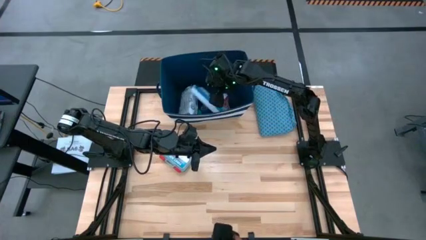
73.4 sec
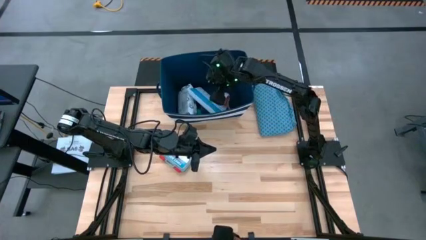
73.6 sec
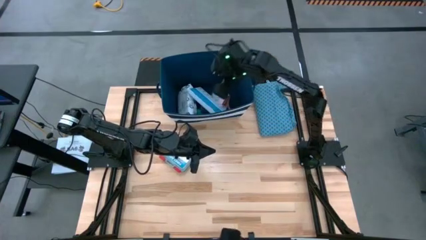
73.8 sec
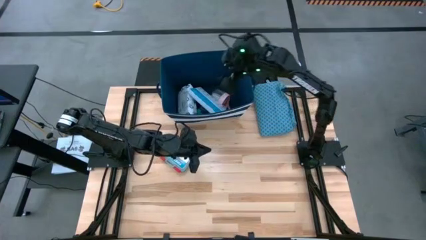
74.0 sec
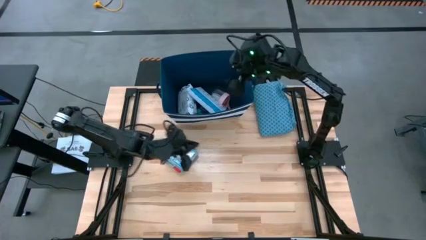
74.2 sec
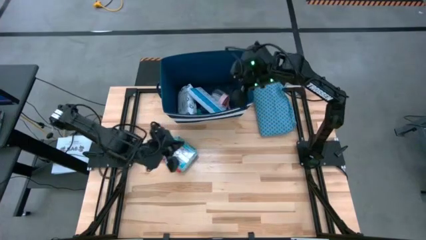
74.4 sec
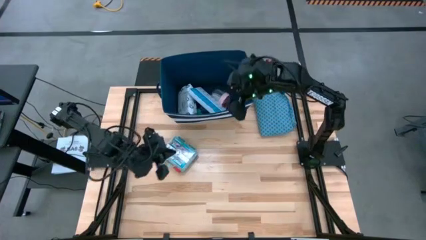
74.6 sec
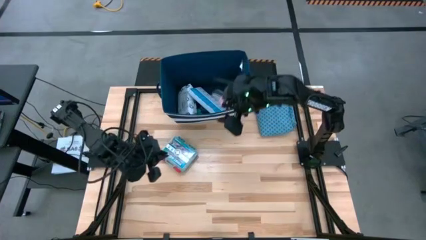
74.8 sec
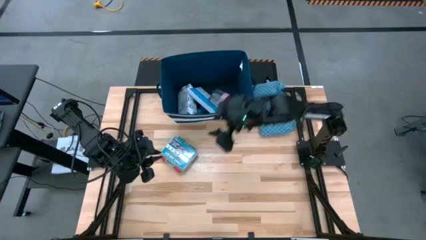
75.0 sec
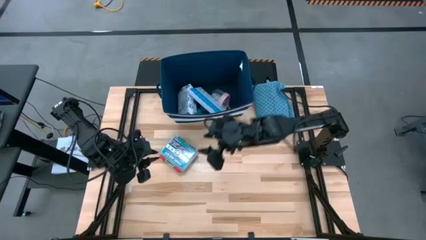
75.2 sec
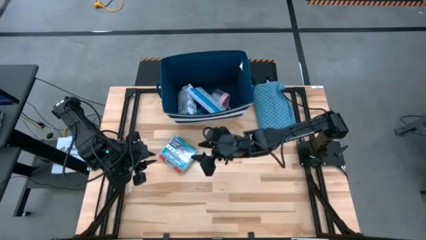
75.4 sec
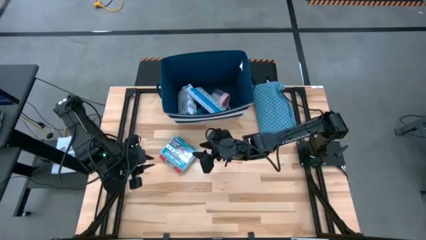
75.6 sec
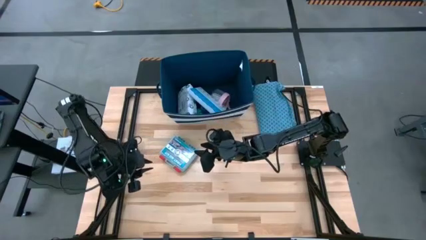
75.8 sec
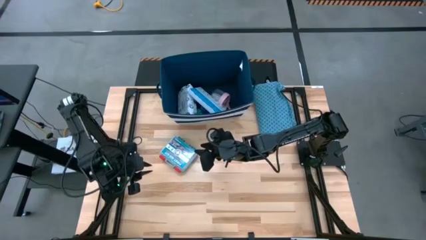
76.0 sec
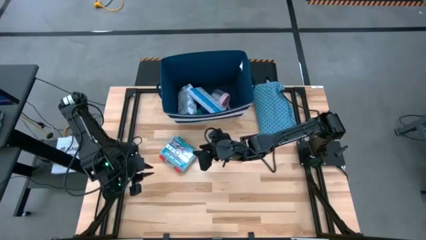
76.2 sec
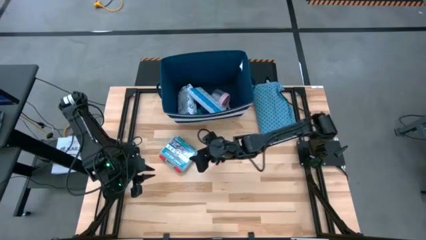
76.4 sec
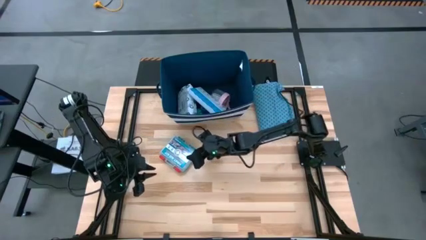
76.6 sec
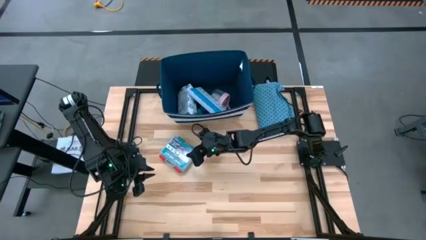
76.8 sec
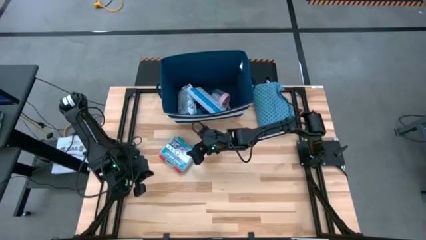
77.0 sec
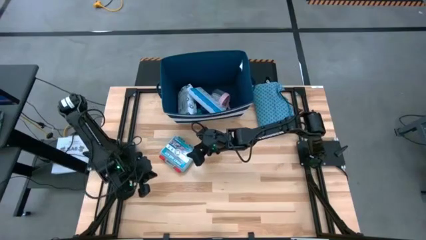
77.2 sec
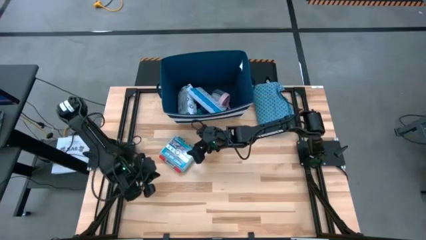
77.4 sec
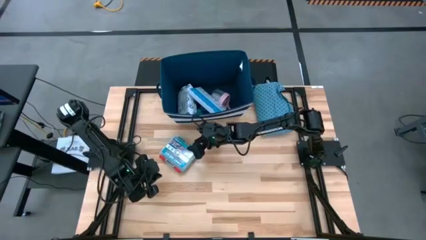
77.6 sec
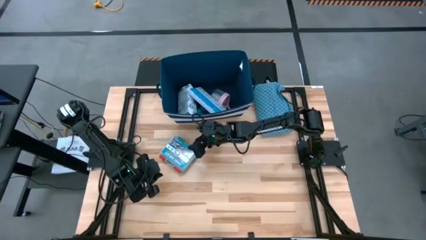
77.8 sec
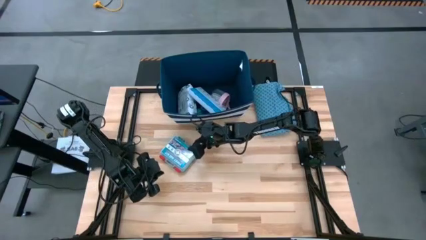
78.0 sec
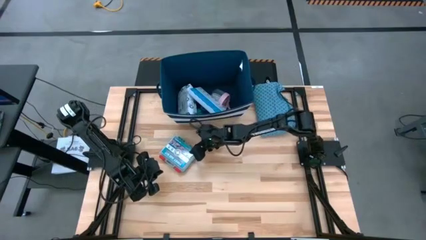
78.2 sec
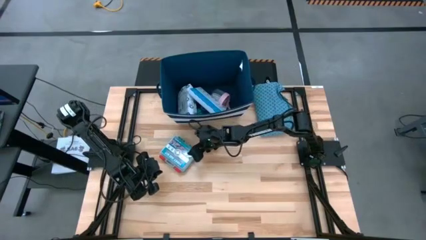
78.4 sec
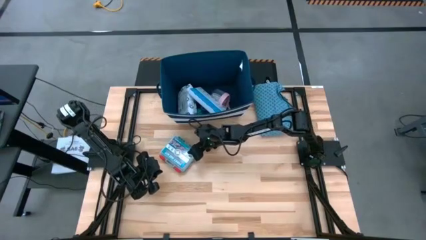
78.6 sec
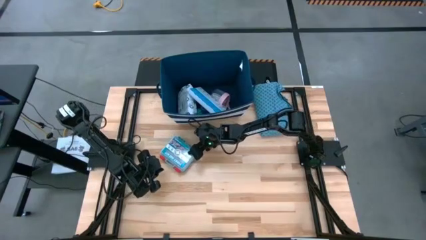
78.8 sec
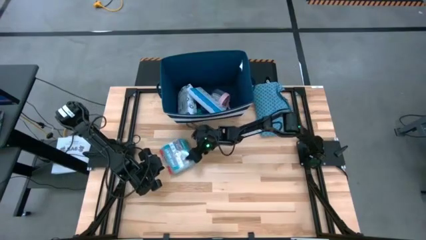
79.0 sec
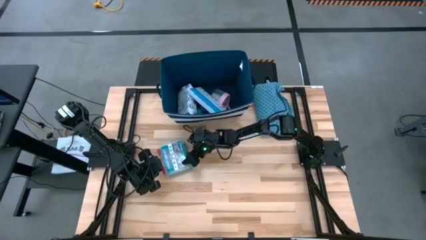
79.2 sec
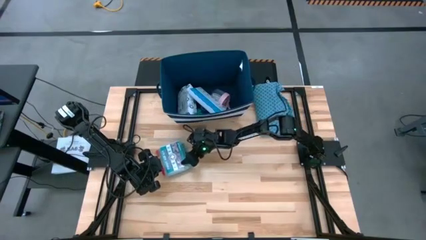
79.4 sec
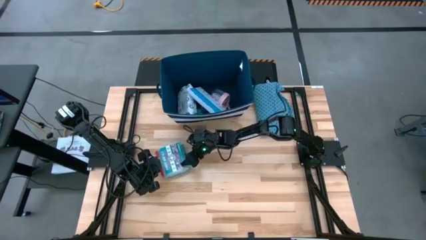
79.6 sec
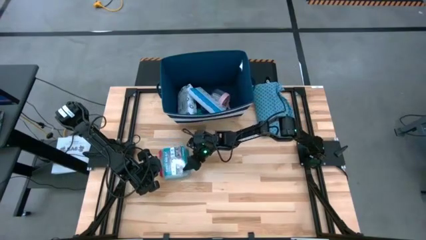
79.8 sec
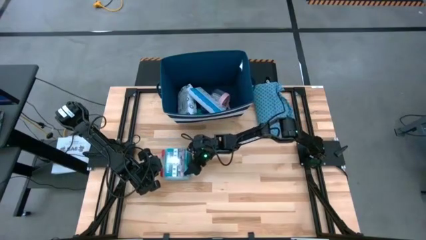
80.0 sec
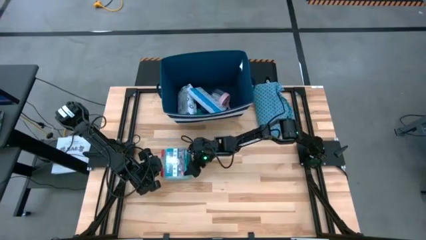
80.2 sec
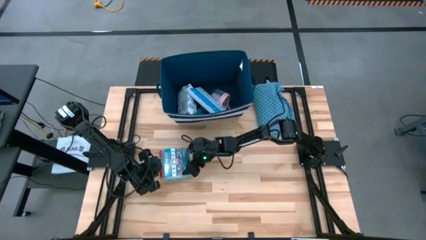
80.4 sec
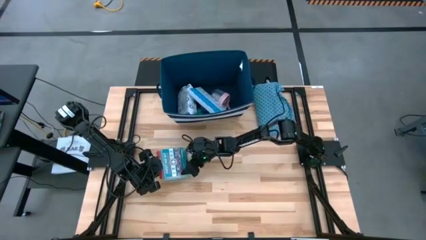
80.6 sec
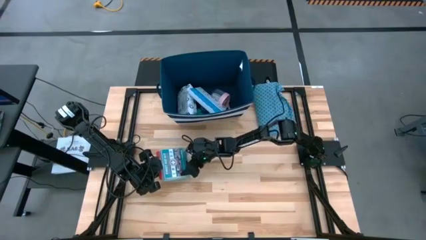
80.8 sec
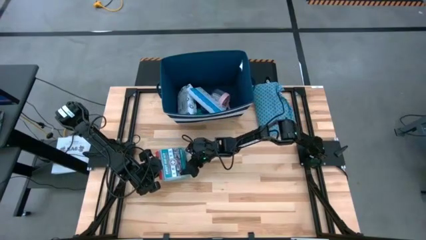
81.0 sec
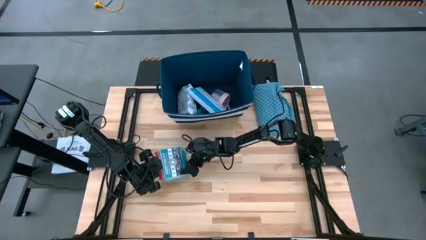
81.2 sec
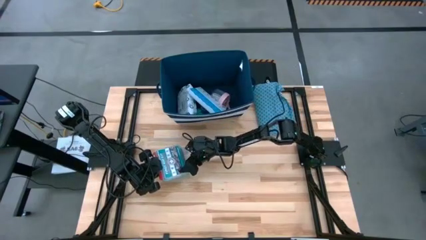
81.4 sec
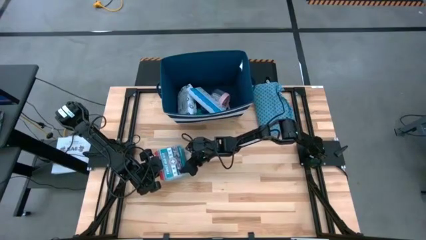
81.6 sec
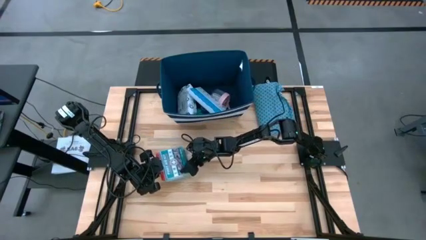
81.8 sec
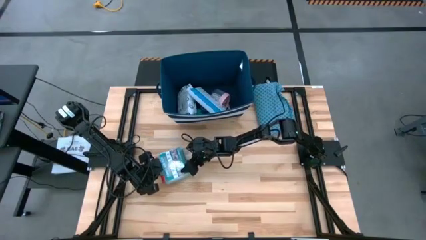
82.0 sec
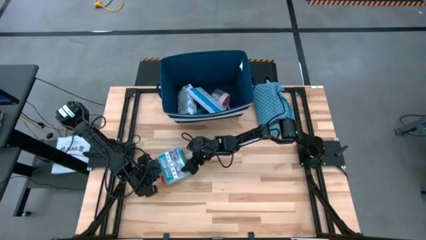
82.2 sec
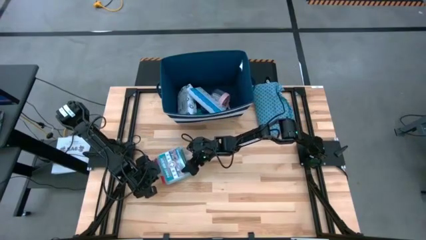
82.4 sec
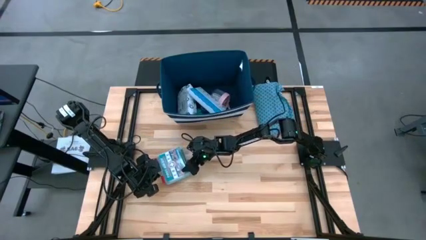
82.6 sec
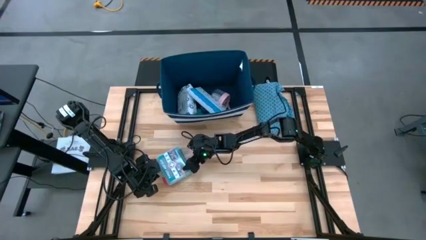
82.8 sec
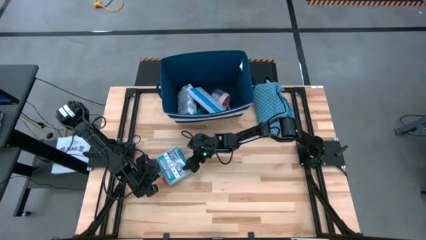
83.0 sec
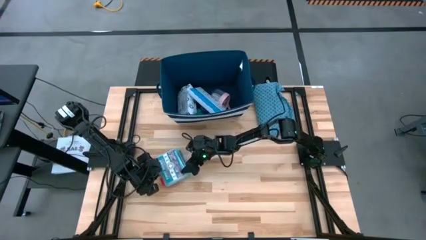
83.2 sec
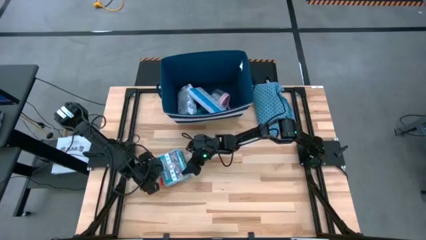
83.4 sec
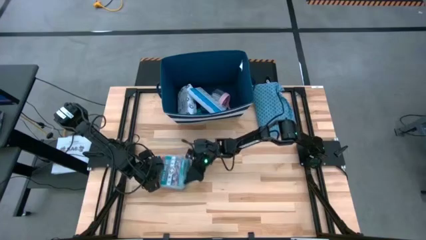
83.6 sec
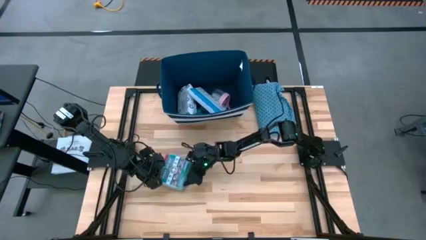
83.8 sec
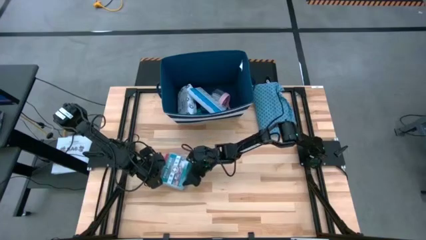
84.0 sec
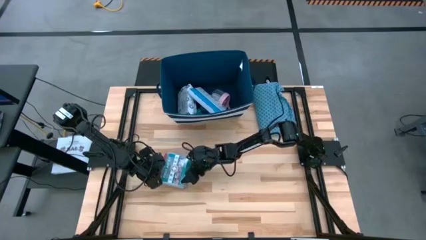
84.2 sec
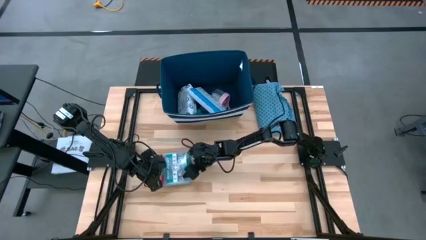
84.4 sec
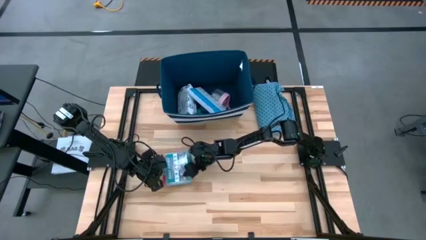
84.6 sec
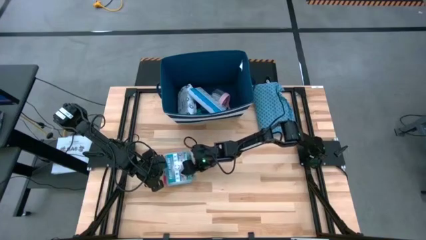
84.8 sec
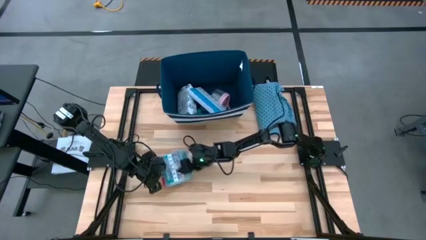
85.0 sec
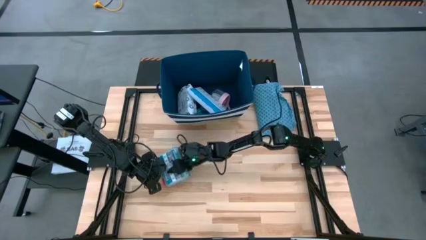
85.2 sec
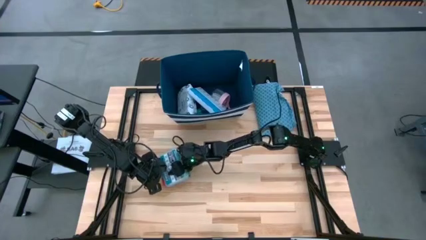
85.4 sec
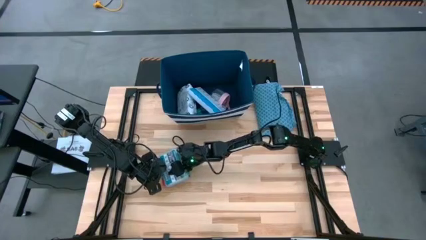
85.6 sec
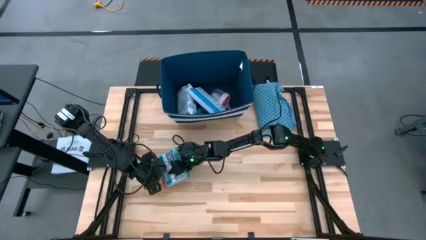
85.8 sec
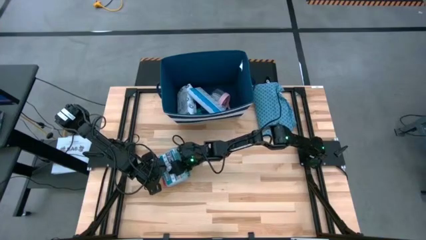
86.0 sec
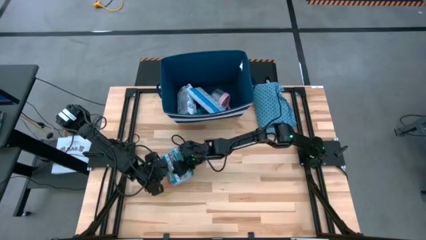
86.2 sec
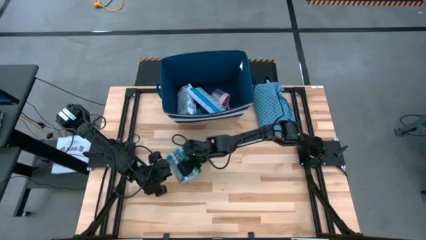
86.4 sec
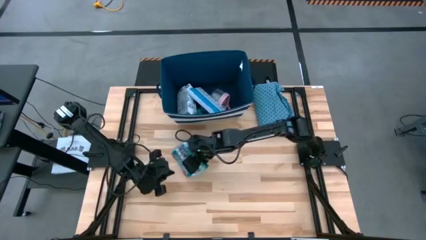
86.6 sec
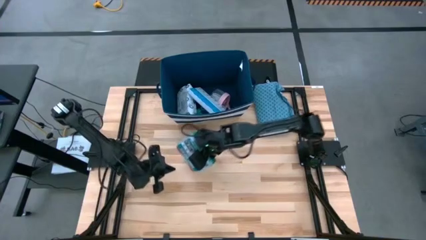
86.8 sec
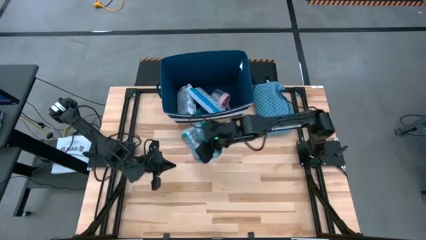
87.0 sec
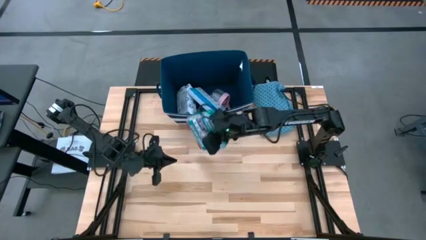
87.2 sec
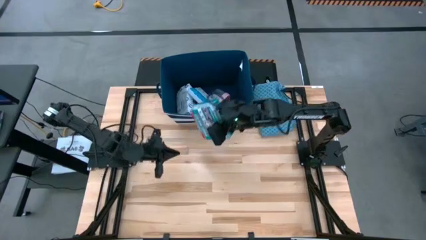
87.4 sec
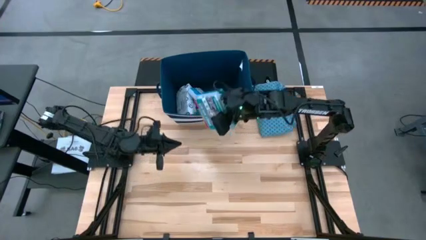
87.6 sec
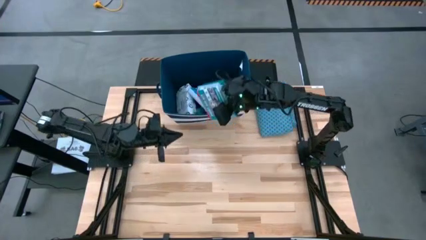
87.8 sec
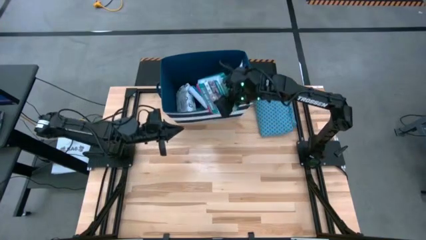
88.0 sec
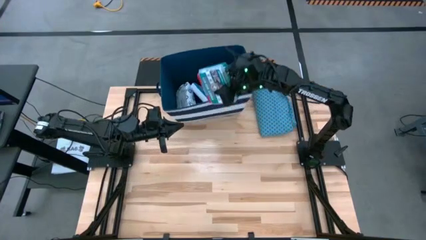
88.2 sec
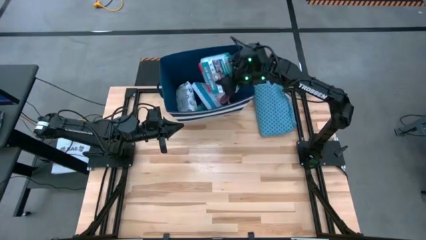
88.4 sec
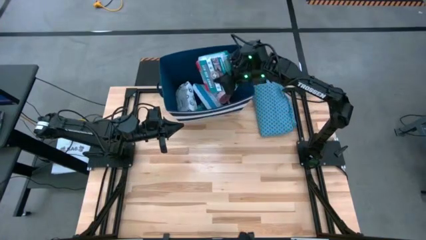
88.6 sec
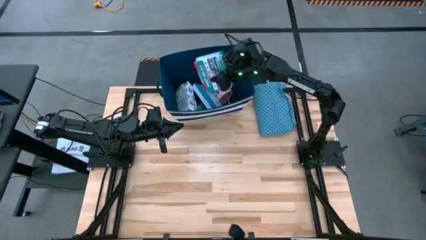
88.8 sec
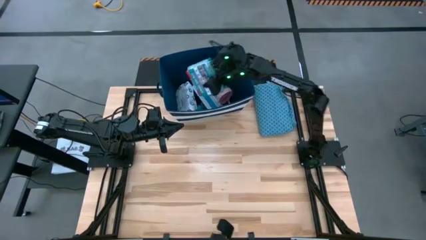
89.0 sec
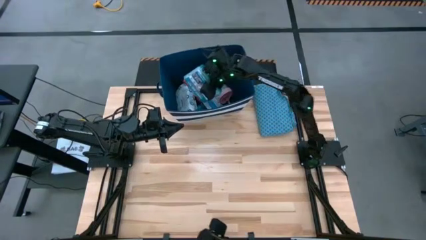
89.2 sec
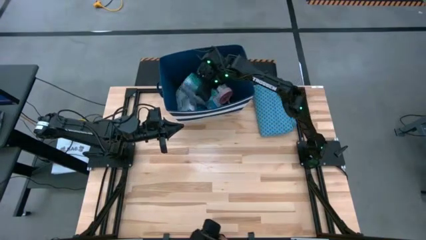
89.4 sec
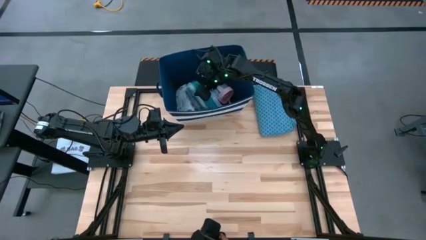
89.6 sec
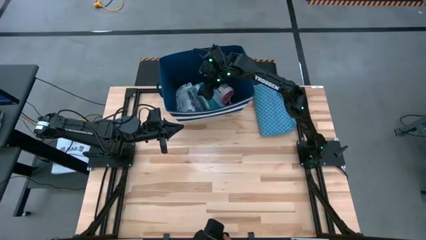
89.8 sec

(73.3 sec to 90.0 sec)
Task: Pack medical supplies into shirt
Put the first aid kit into the blue patterned shirt
